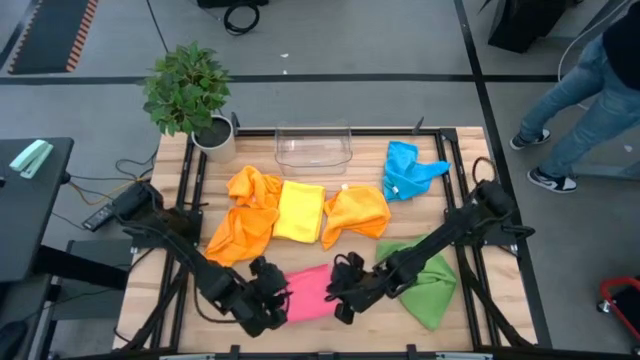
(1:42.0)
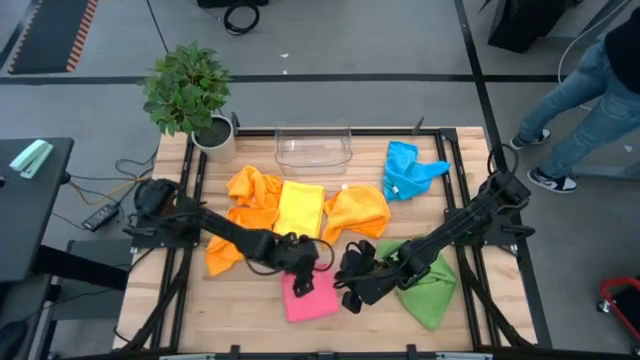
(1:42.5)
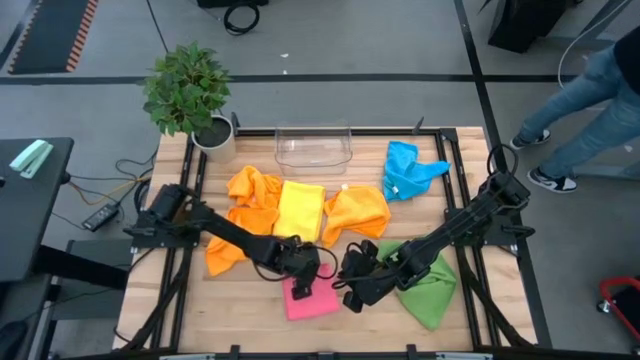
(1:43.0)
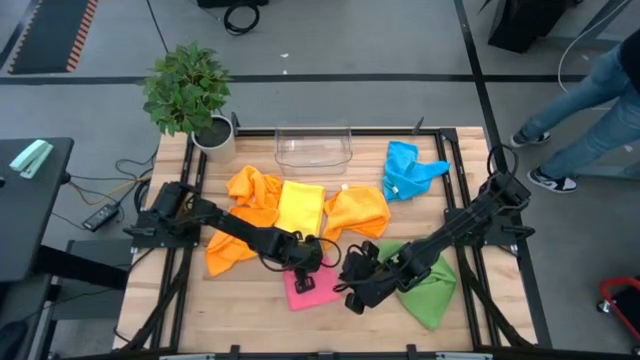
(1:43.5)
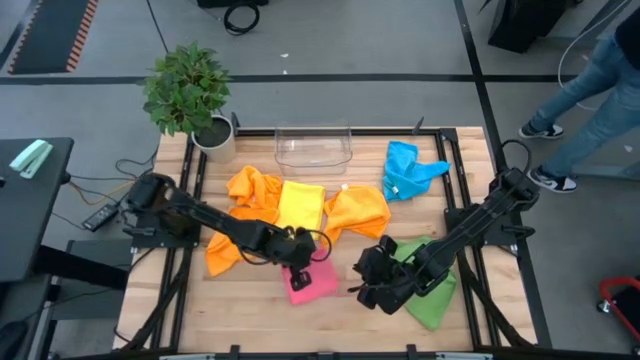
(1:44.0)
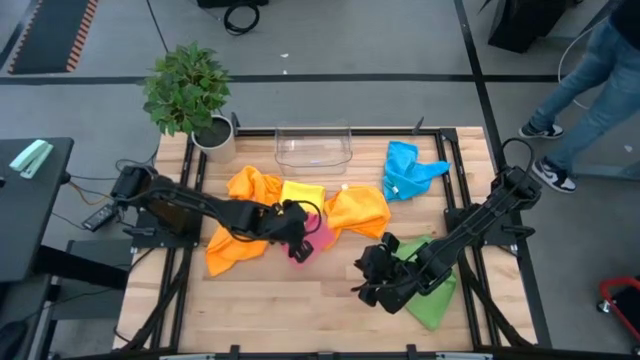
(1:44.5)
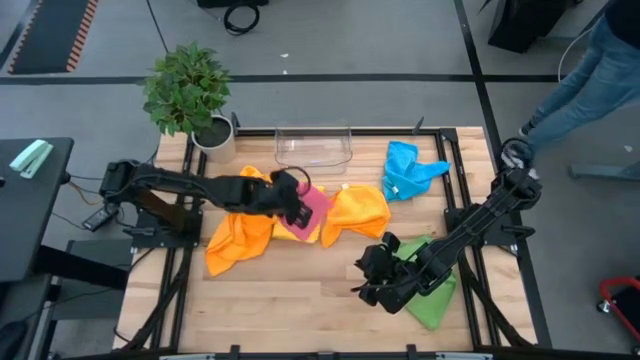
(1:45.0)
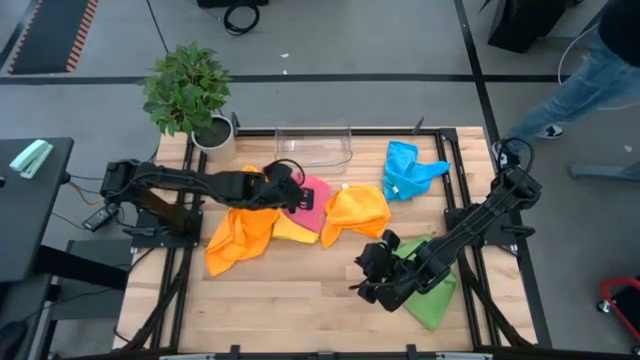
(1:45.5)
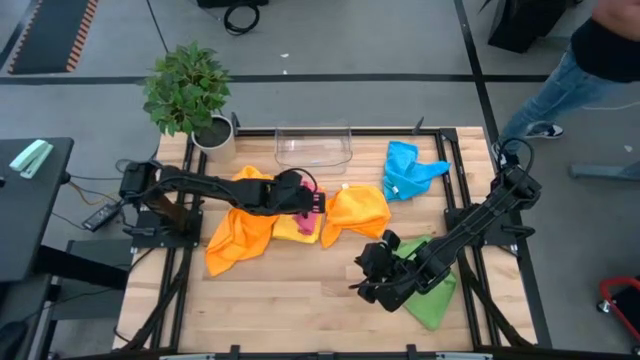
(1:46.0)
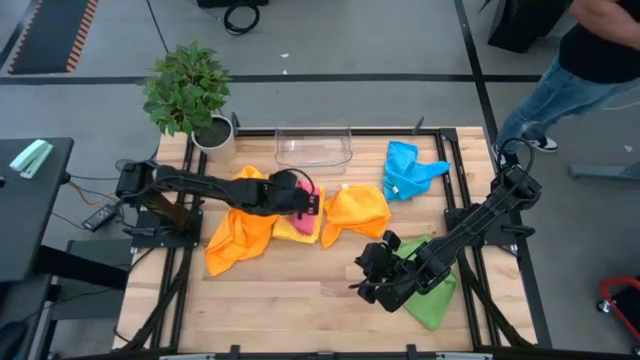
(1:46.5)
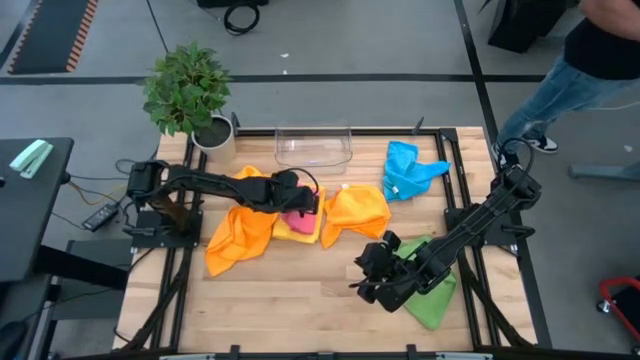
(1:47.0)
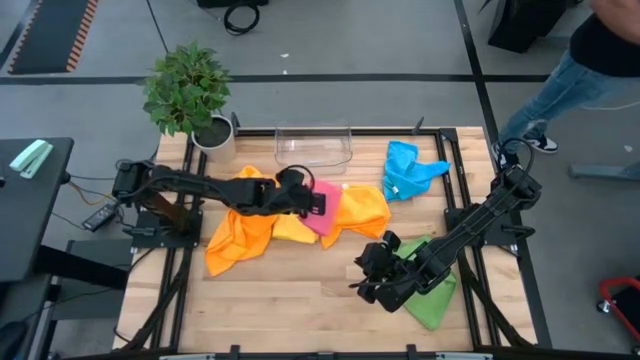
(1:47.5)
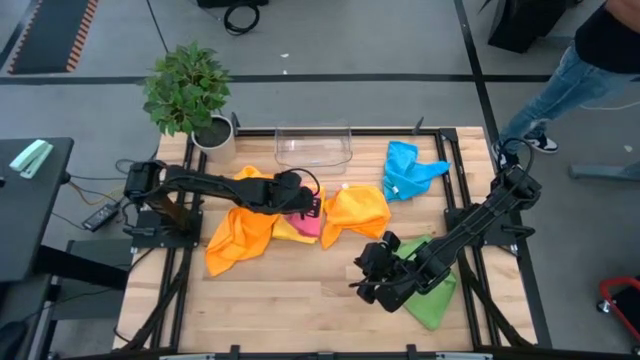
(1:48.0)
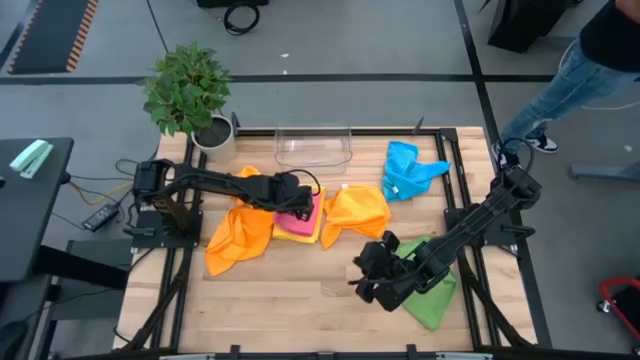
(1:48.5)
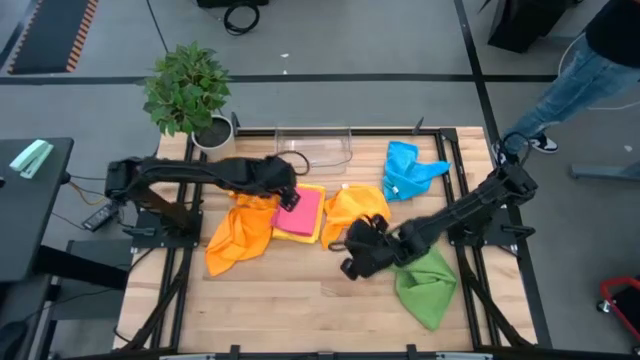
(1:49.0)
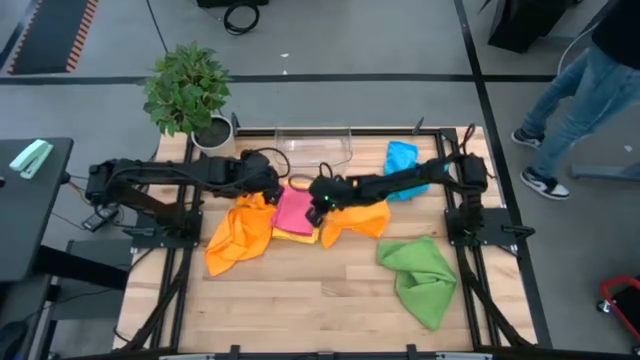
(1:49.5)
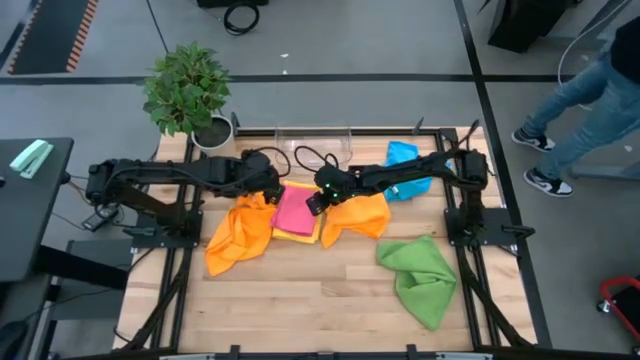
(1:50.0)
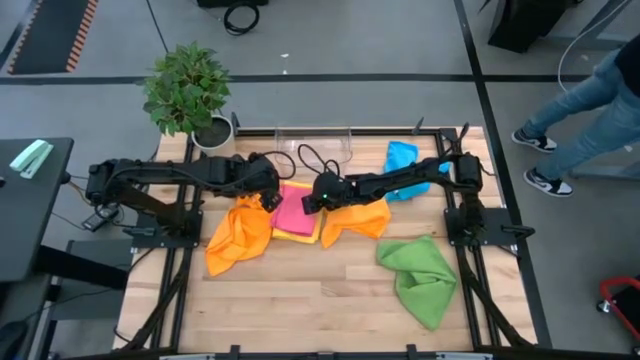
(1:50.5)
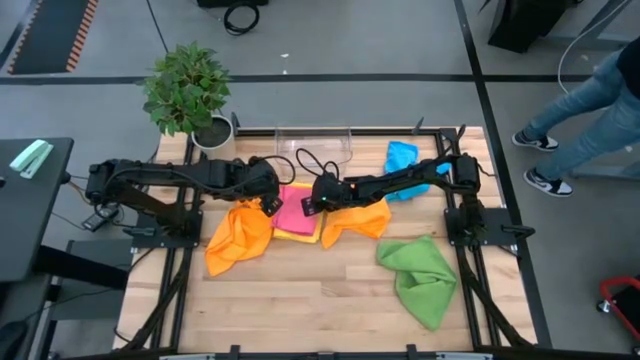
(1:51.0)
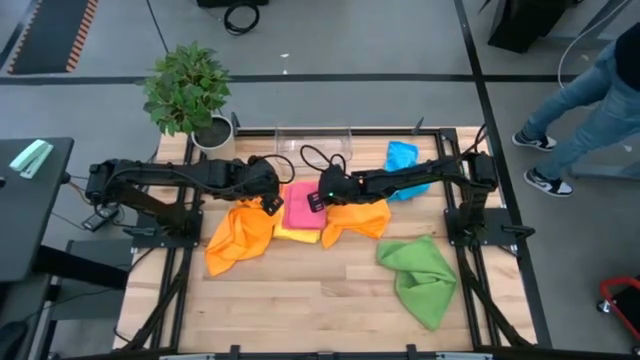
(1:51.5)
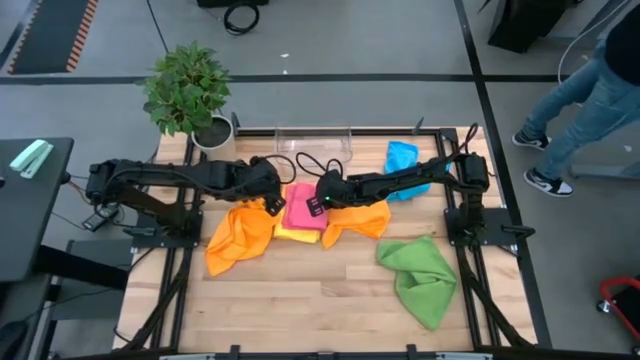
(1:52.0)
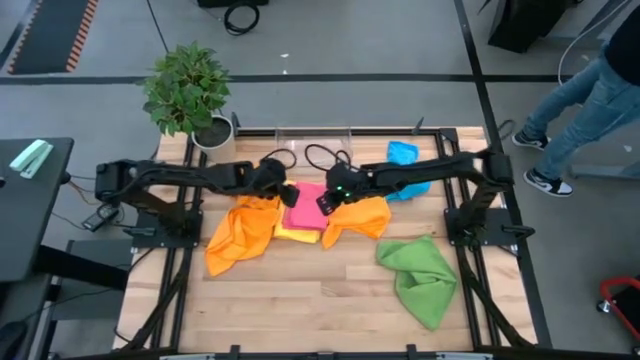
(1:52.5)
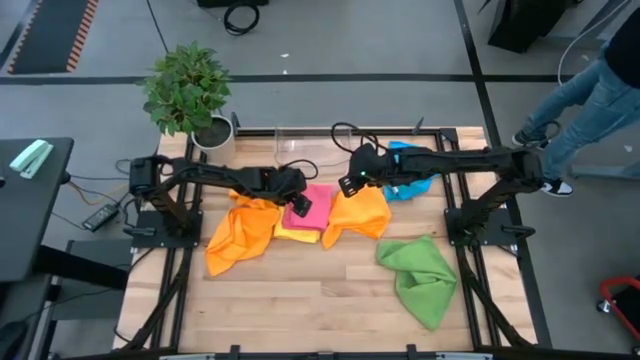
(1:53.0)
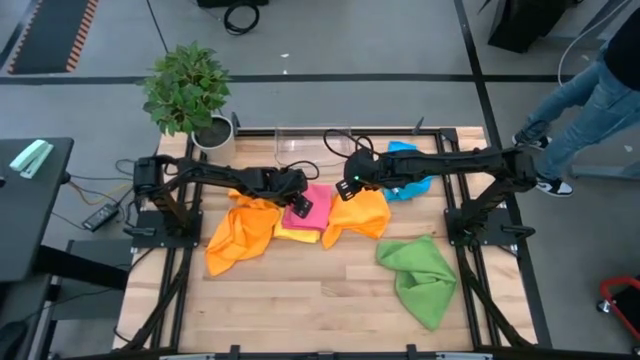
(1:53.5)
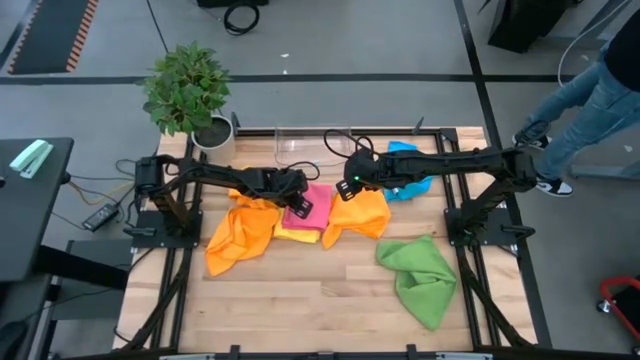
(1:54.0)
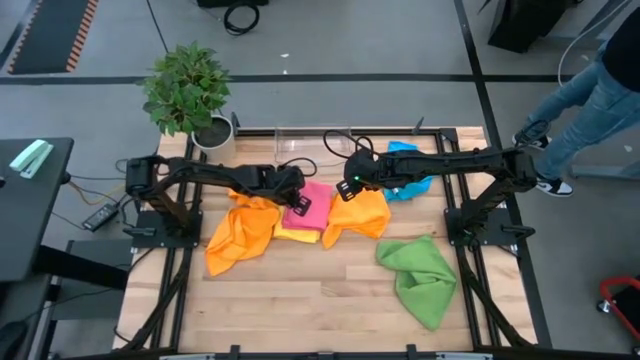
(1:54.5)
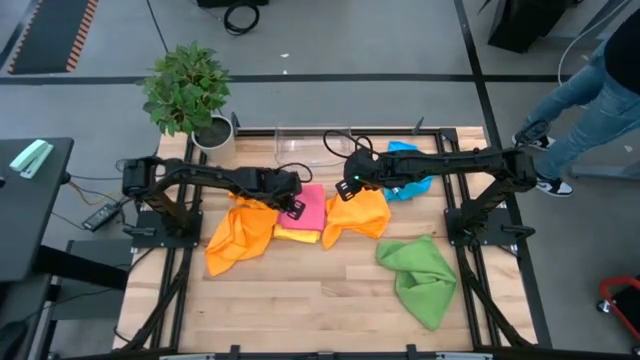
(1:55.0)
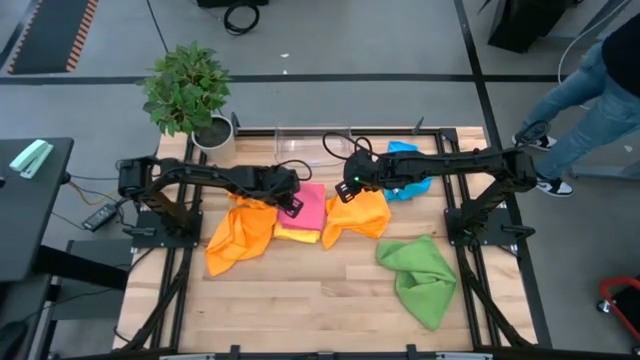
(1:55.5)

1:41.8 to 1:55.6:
Task: Fold microfiber towels
Stack the folded pink microfiber cloth on top of the folded yellow microfiber cloth

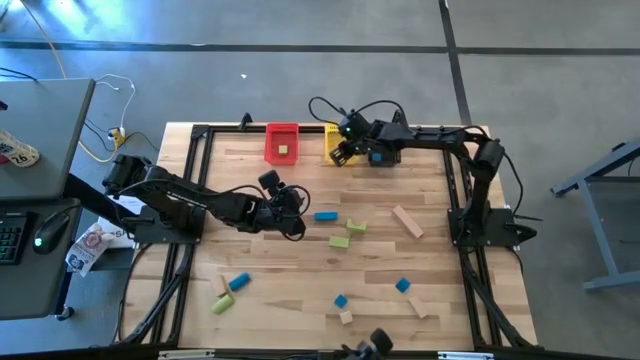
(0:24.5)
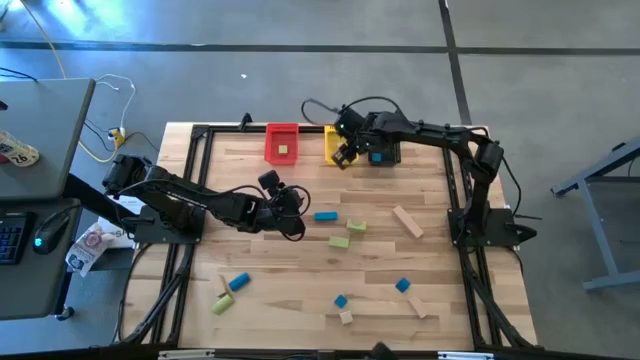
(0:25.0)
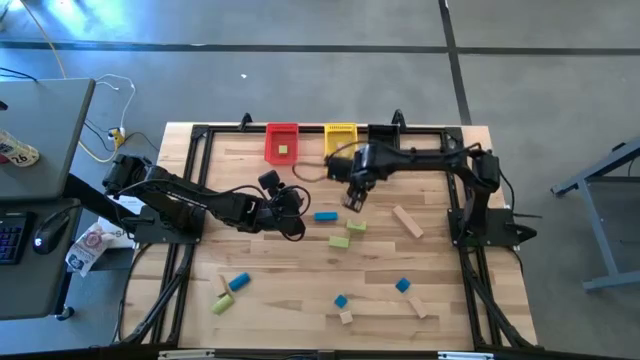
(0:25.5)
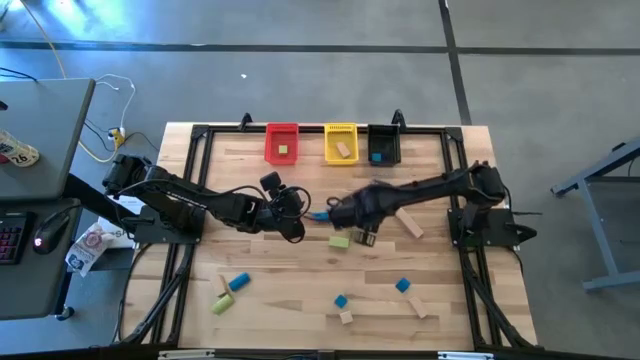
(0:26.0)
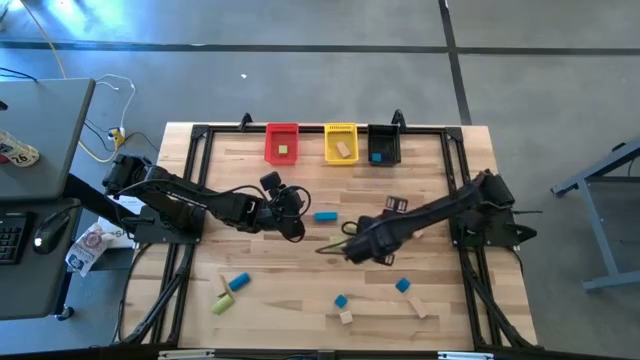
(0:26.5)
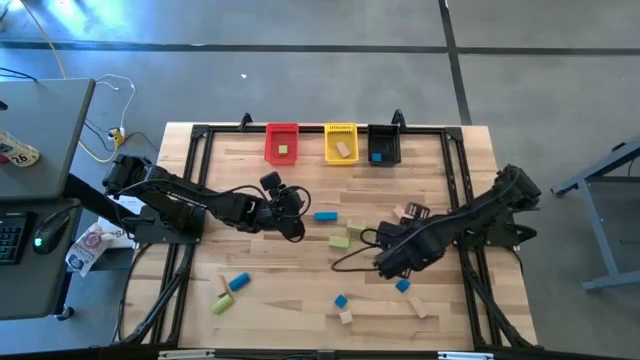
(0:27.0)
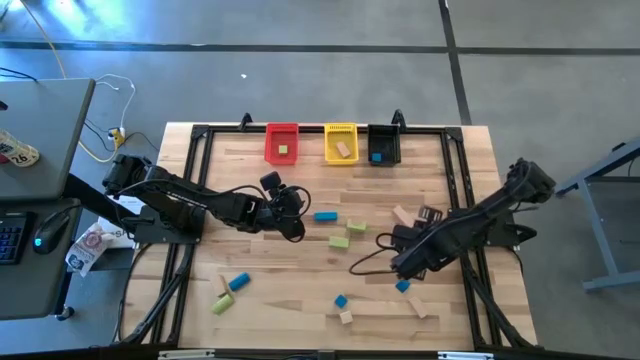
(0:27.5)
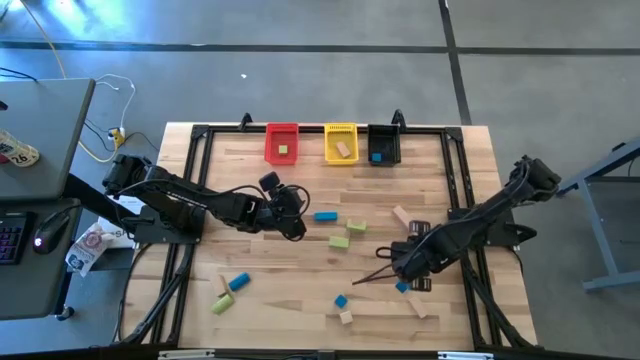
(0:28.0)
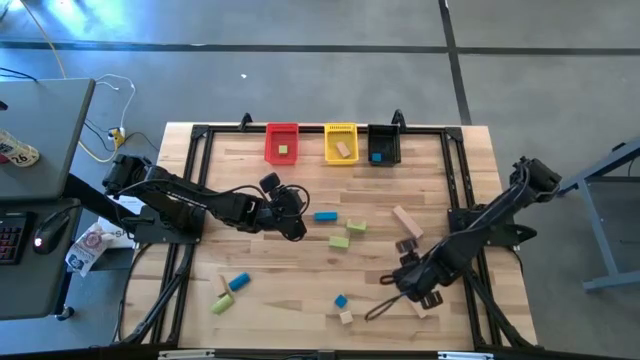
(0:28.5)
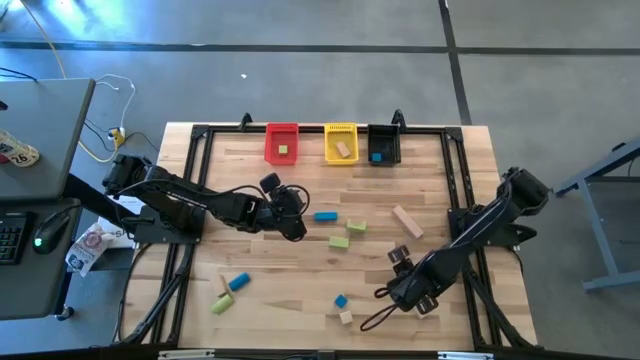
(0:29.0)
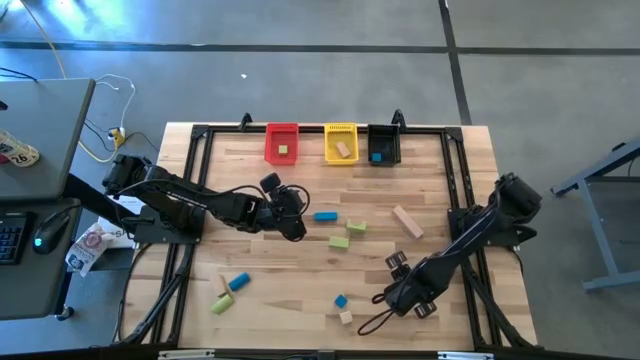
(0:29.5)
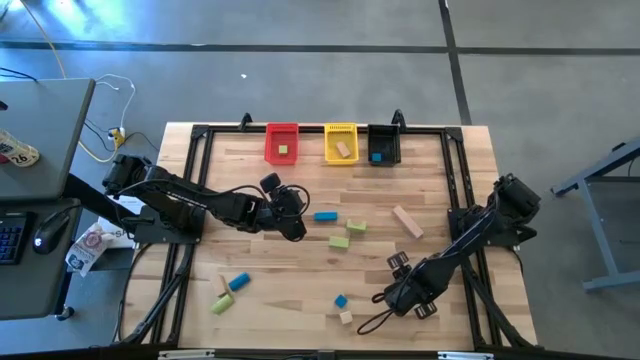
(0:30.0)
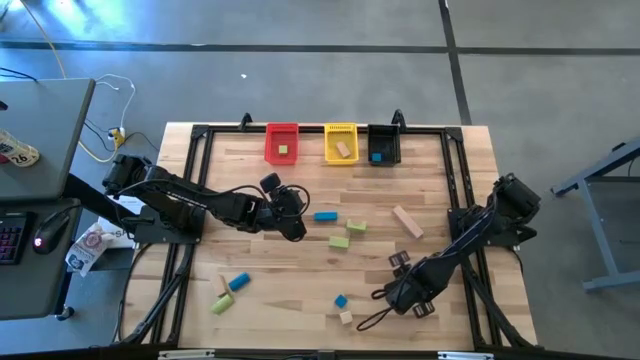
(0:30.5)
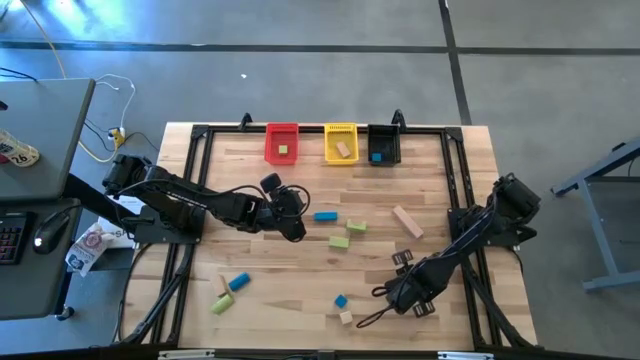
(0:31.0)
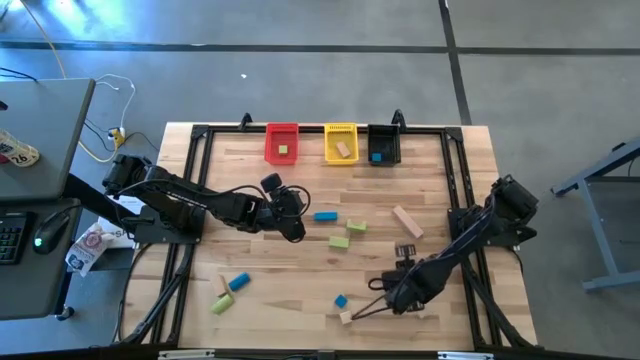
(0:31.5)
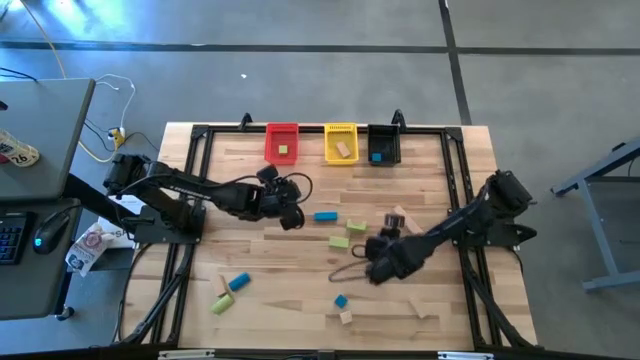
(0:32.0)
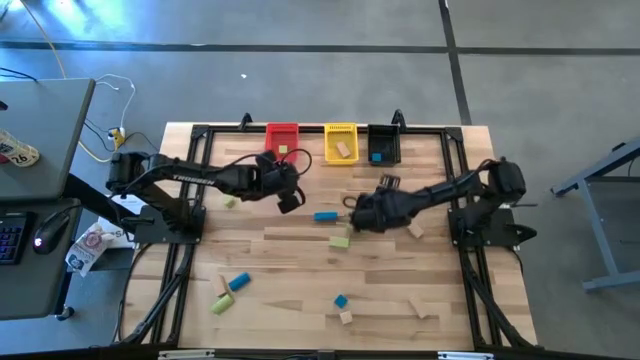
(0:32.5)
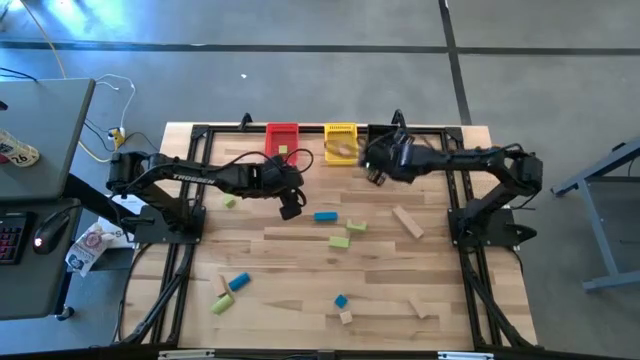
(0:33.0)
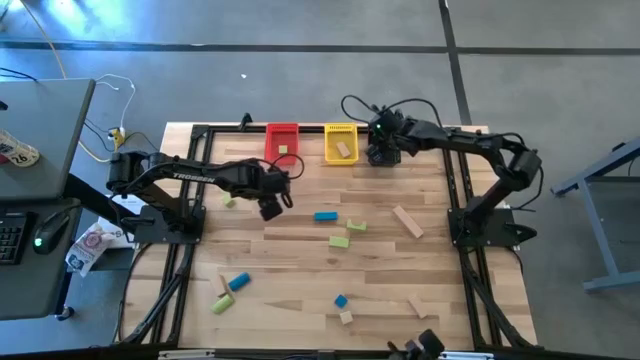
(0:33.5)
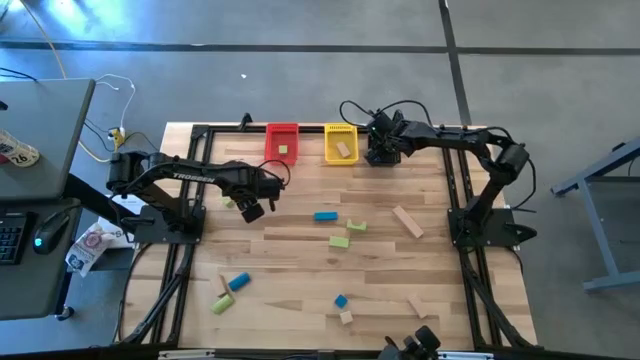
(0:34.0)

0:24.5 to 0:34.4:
Task: Sort & place blocks by color
Put the blue block into the black bin
